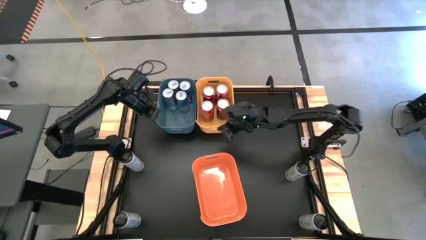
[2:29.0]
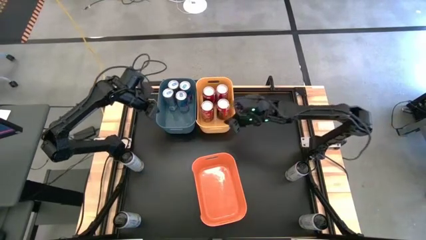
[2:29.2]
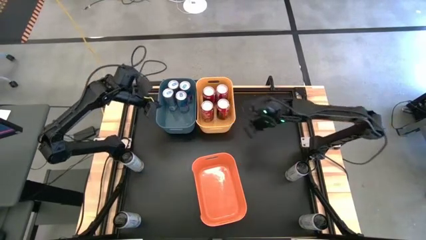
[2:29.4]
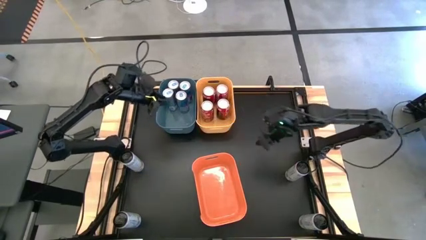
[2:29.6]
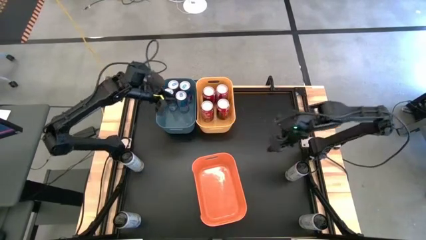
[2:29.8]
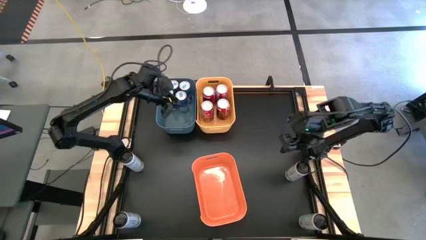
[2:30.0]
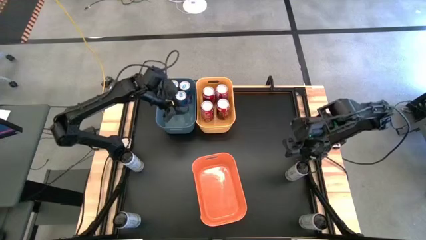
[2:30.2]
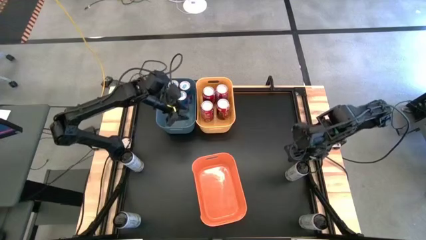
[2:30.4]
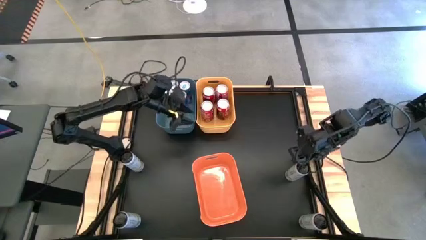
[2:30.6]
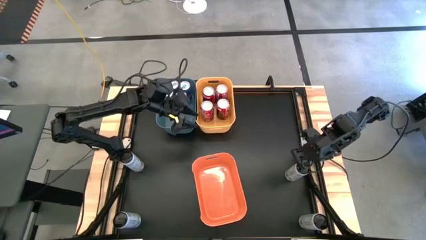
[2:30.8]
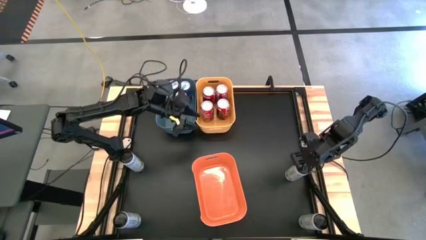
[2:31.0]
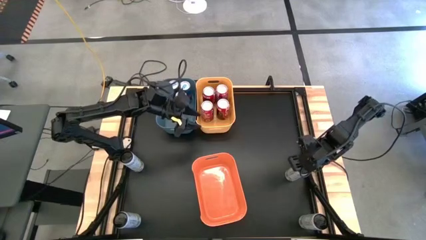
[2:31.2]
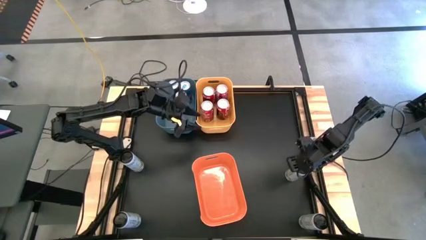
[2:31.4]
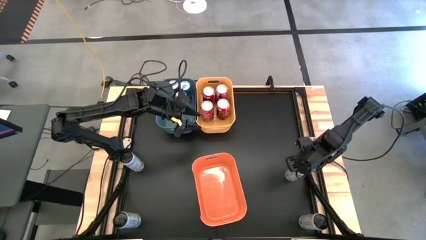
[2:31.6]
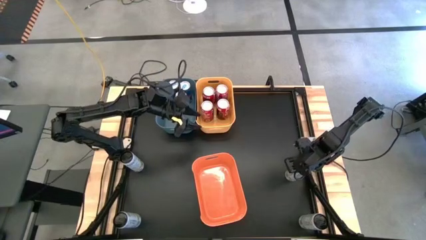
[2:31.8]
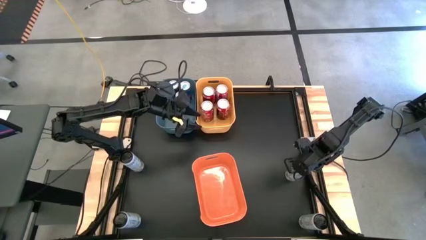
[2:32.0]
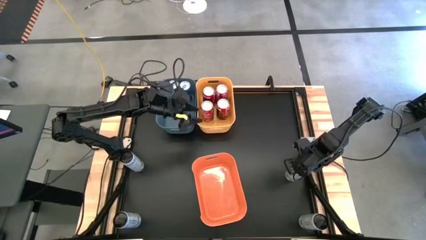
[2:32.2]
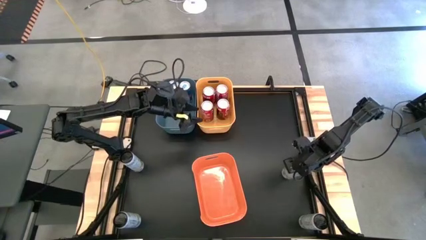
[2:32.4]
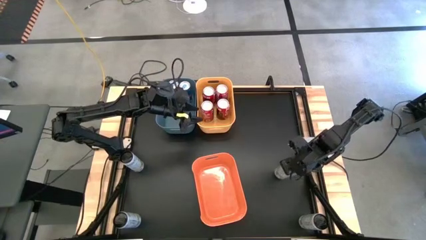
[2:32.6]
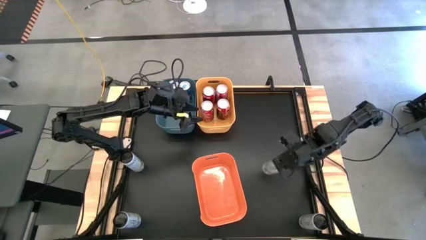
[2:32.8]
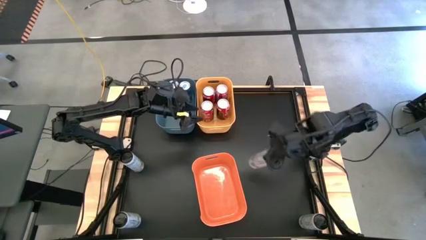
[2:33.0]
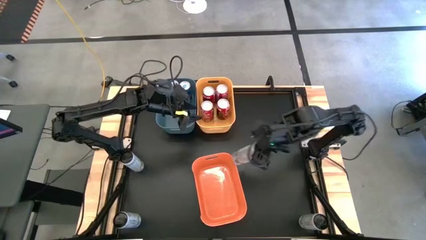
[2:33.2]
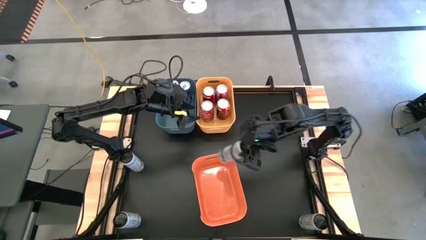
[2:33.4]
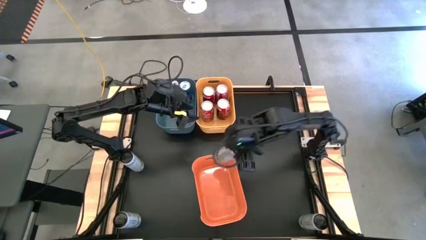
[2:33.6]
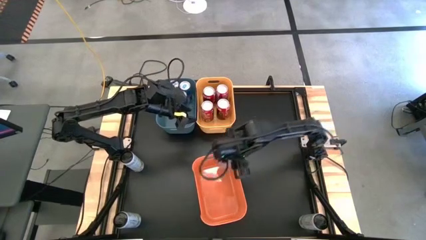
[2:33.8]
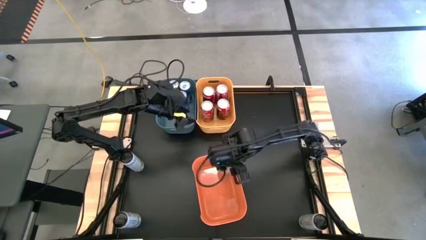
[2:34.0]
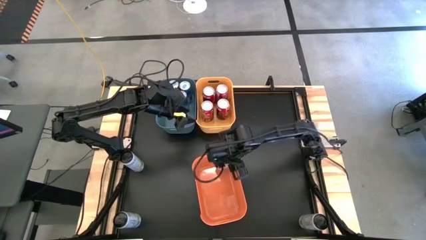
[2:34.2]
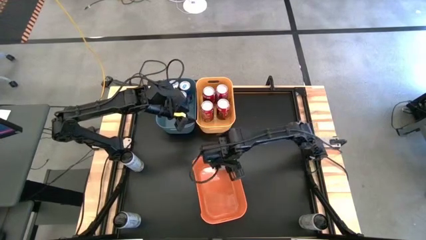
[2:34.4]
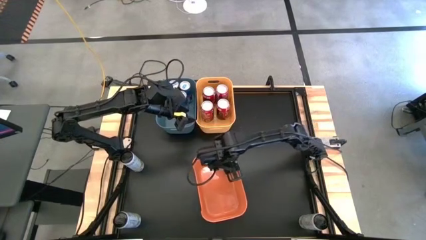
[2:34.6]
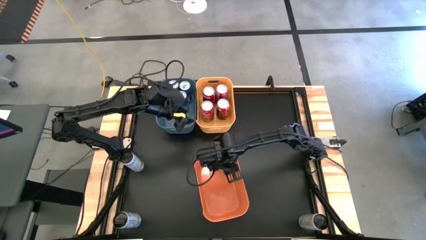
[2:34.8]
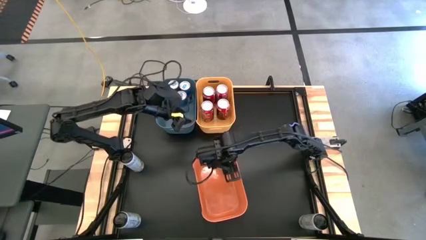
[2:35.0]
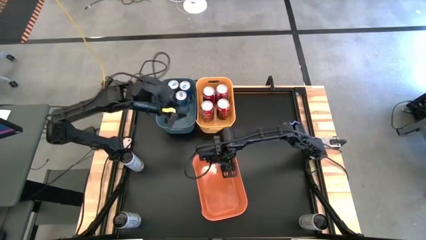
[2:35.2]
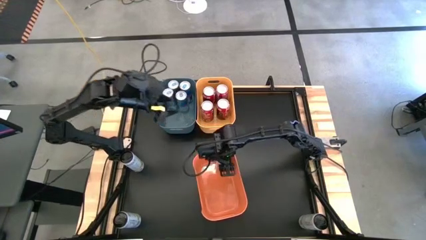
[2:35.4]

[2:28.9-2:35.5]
Task: Sort soda cans
Put the top right white soda can into the orange bin

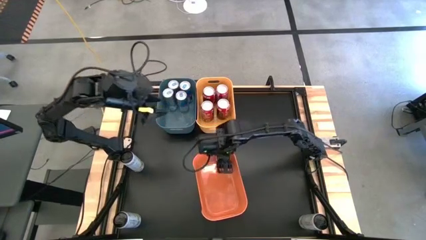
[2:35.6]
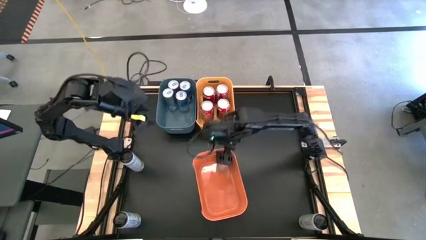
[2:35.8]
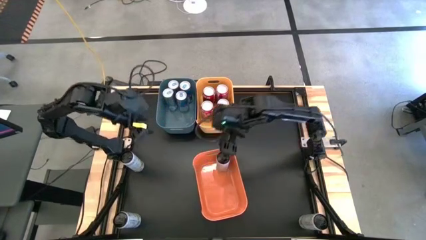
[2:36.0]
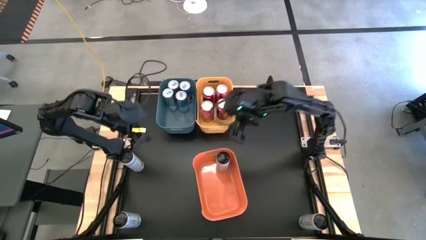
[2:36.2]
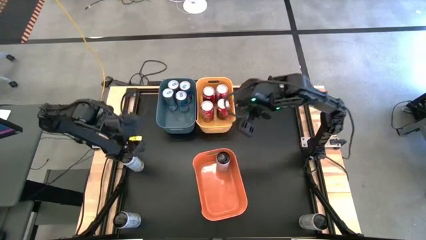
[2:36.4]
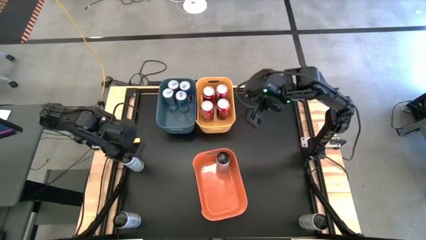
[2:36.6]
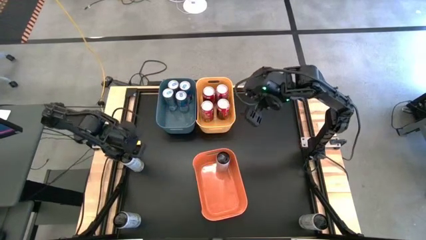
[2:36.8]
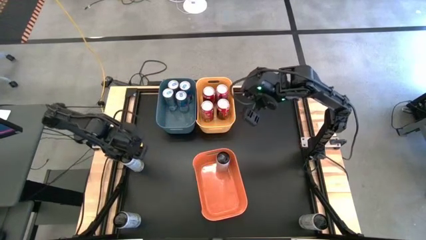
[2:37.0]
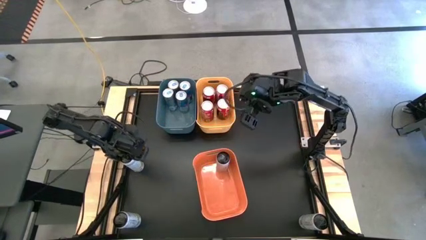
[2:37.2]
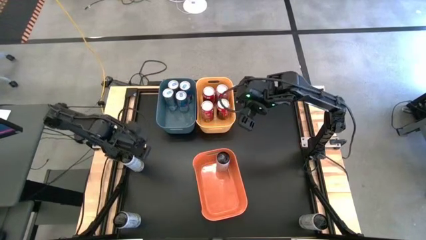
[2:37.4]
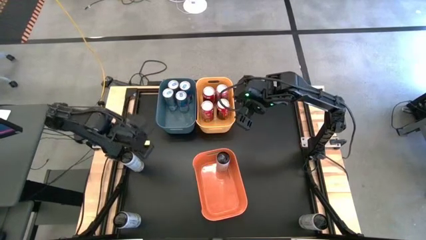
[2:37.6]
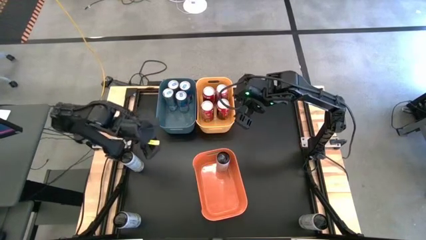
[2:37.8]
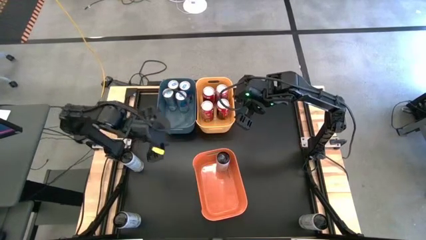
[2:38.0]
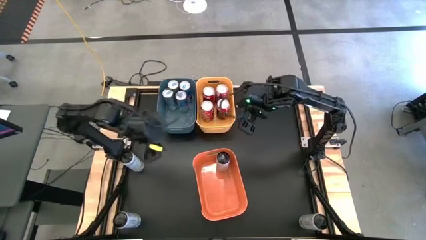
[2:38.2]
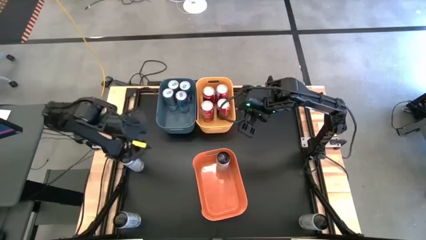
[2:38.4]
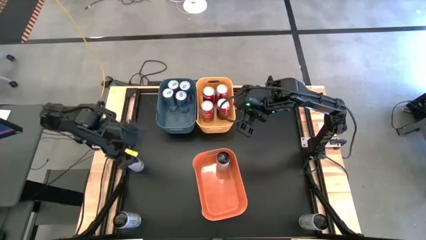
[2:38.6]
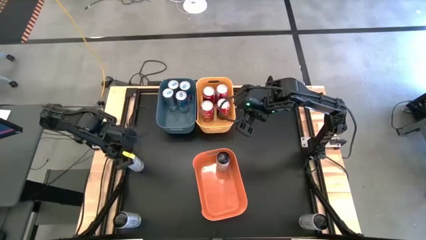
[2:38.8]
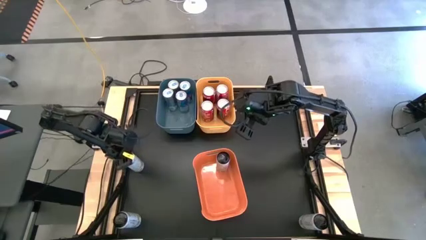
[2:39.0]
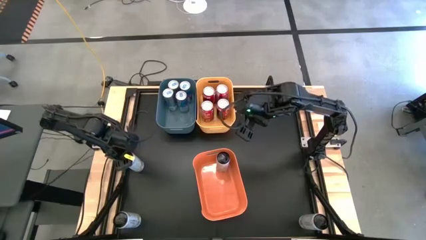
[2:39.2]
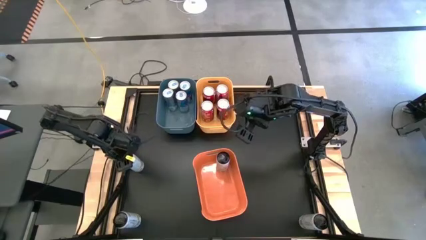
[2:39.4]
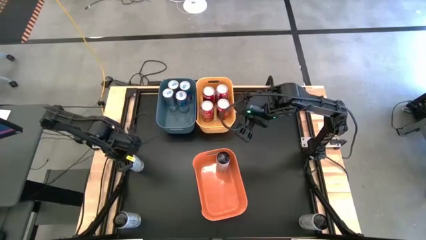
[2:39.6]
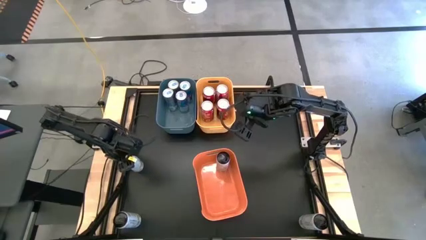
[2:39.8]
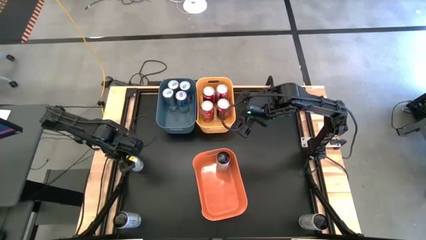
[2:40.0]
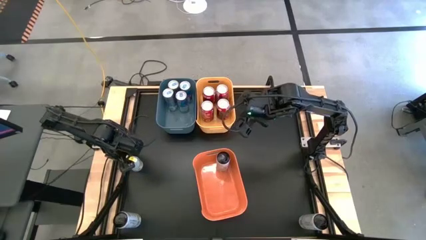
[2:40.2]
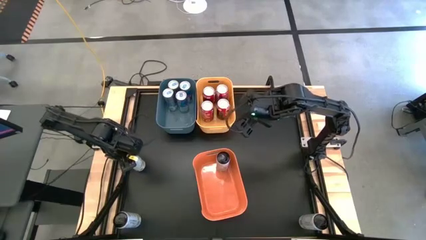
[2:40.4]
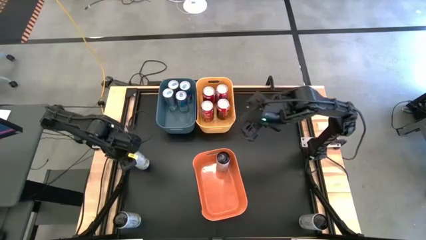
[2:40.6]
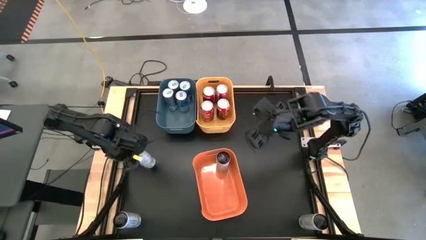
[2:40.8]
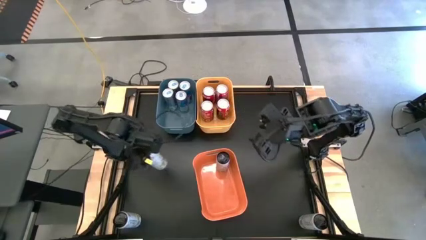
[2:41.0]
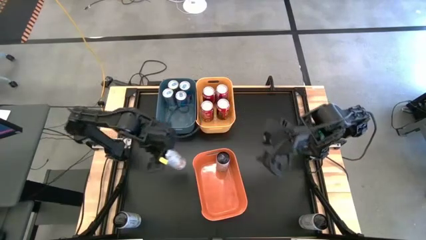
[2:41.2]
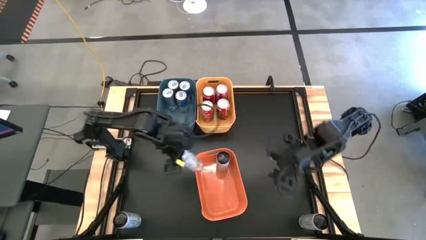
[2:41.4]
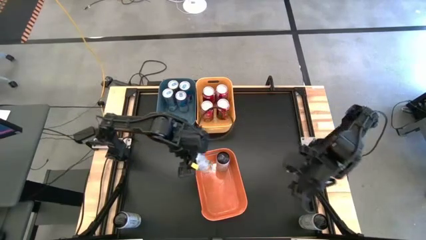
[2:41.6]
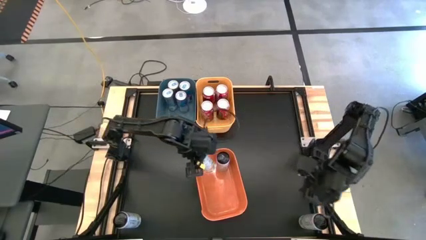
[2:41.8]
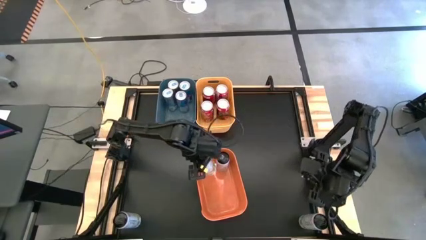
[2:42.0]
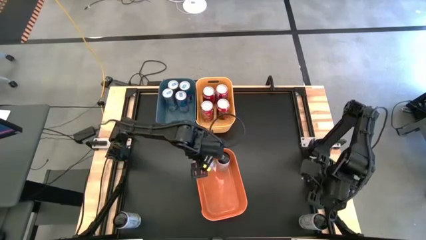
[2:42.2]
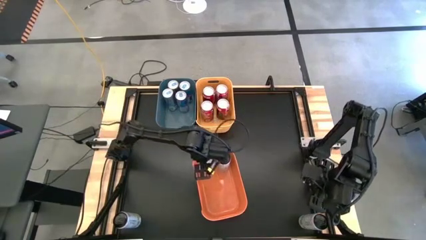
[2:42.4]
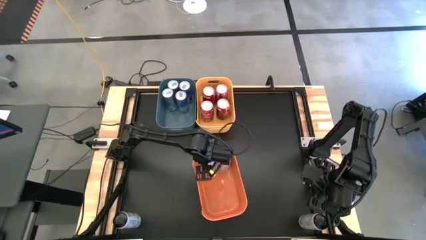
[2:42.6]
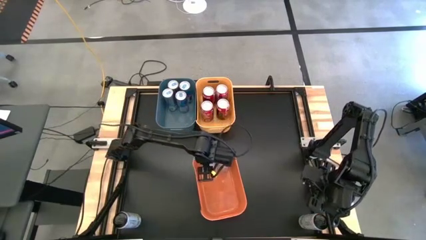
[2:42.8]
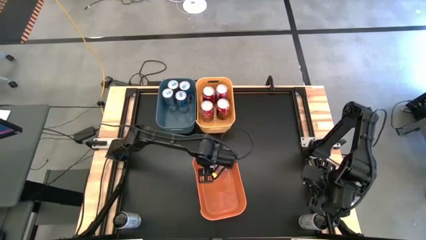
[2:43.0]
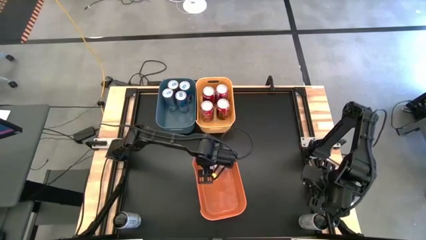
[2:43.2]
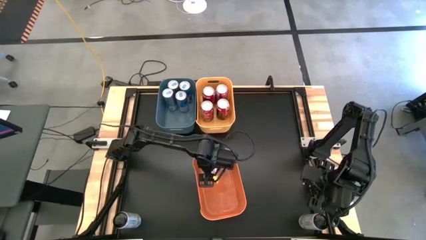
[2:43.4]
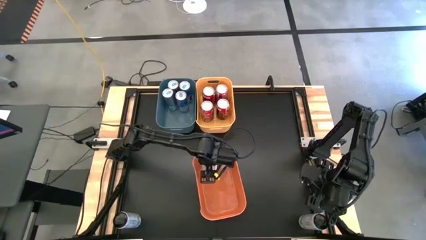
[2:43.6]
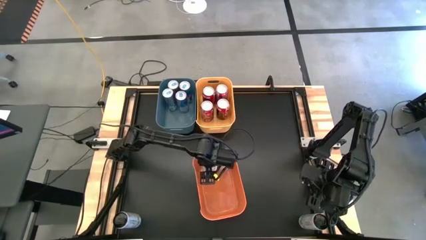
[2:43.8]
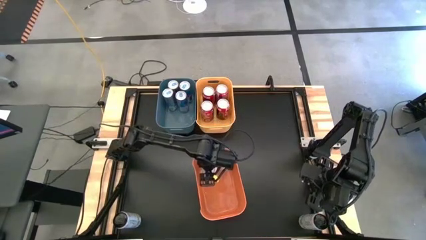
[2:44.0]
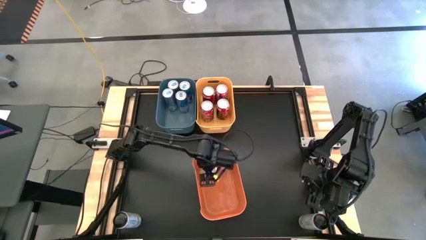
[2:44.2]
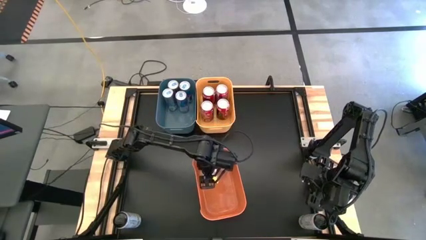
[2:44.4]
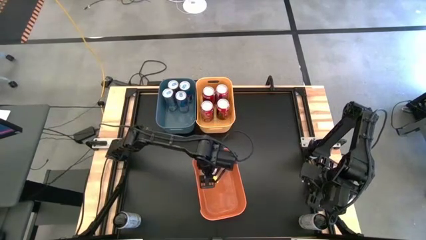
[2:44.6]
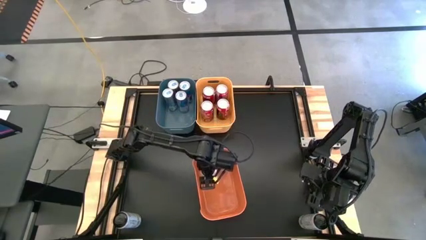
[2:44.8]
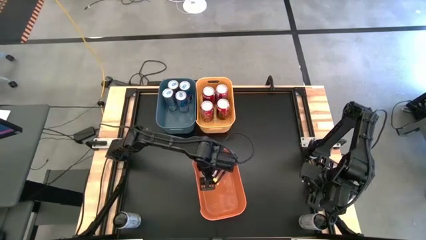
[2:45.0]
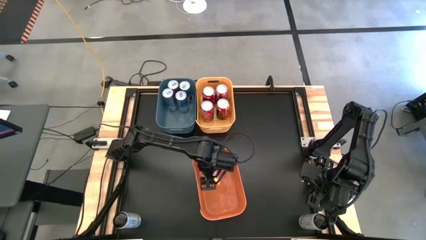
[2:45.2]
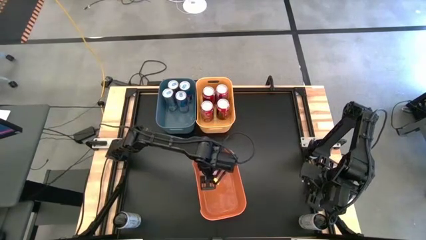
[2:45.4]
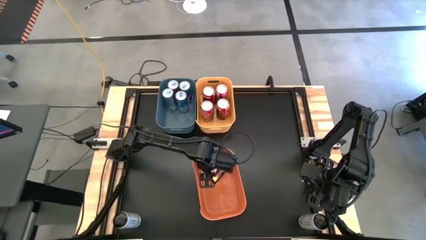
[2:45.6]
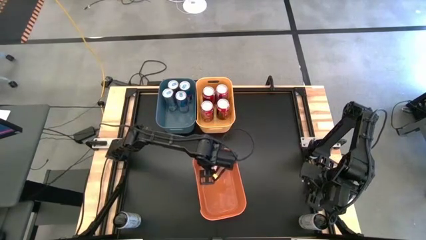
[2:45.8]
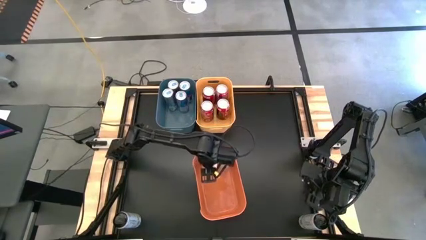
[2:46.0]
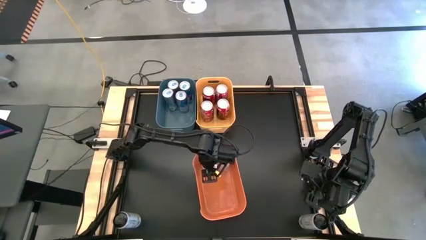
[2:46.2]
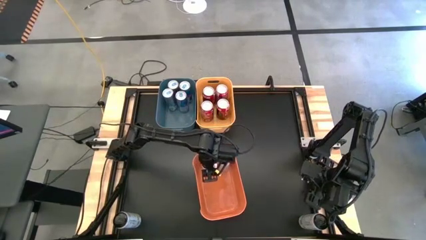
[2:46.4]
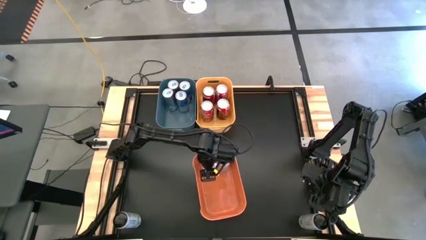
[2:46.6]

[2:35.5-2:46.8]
Put the top left white soda can into the orange bin
